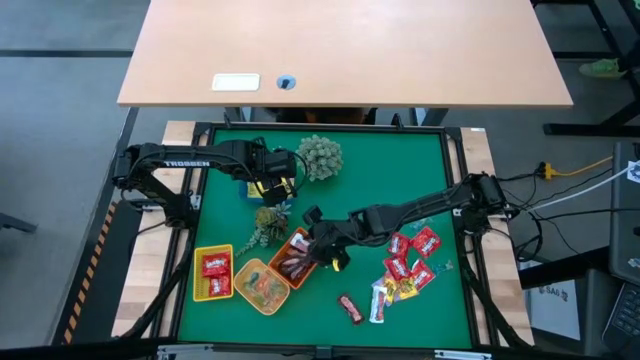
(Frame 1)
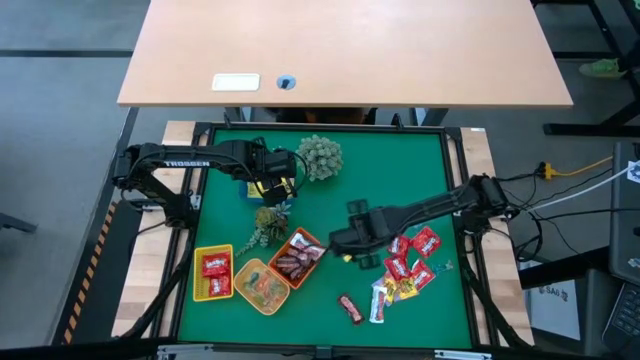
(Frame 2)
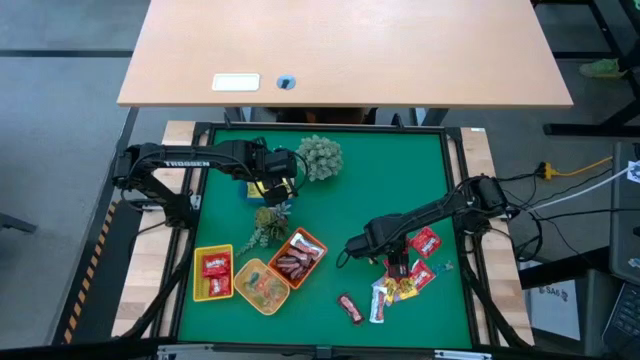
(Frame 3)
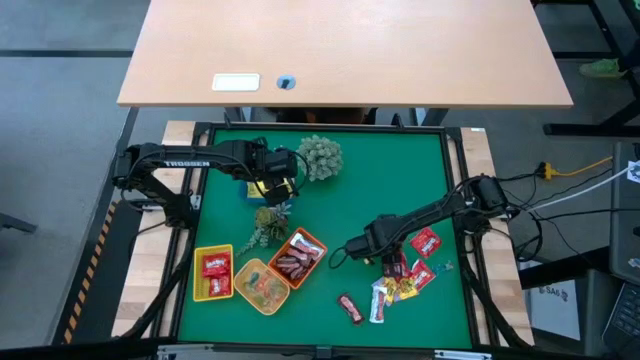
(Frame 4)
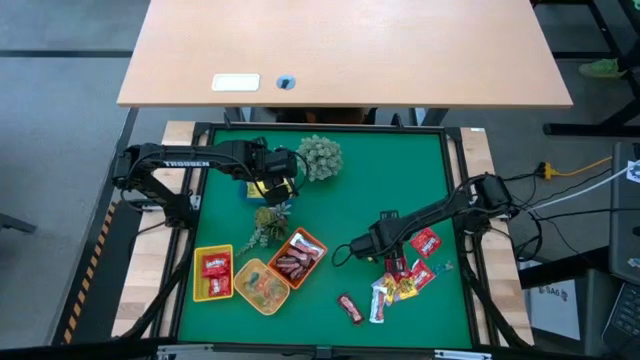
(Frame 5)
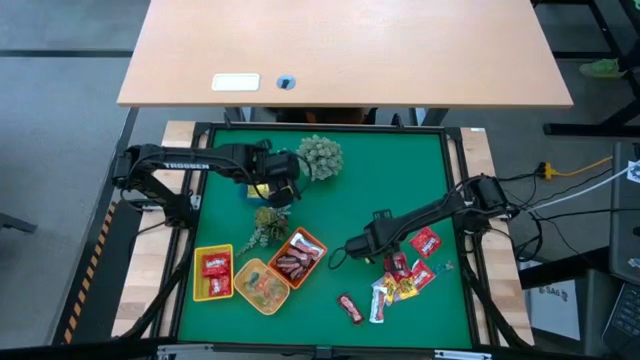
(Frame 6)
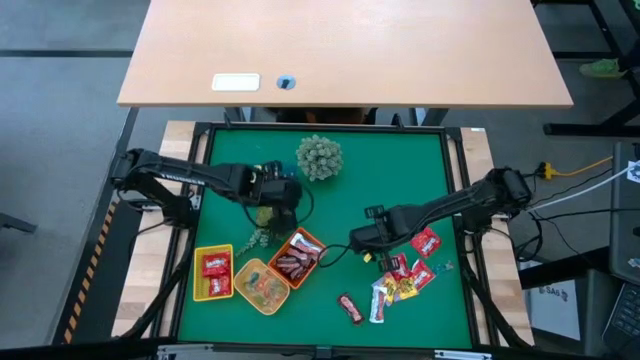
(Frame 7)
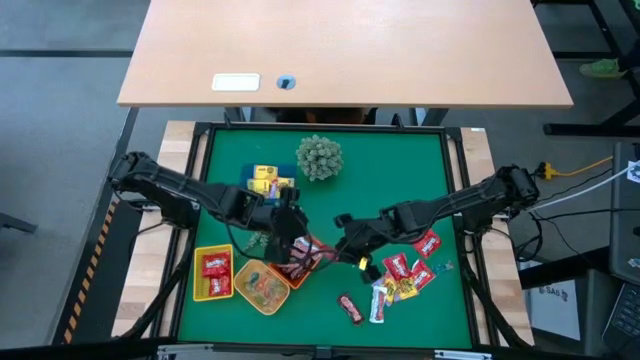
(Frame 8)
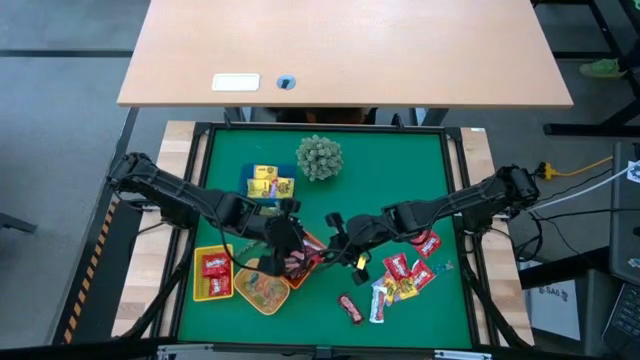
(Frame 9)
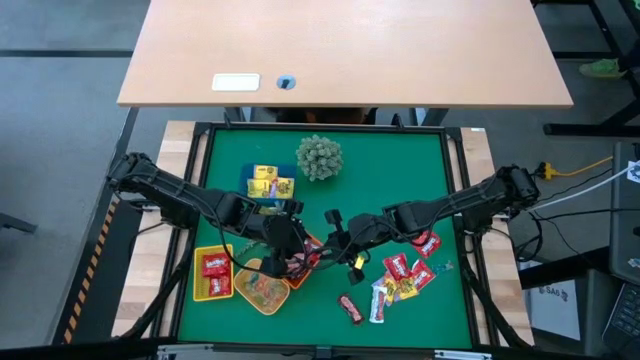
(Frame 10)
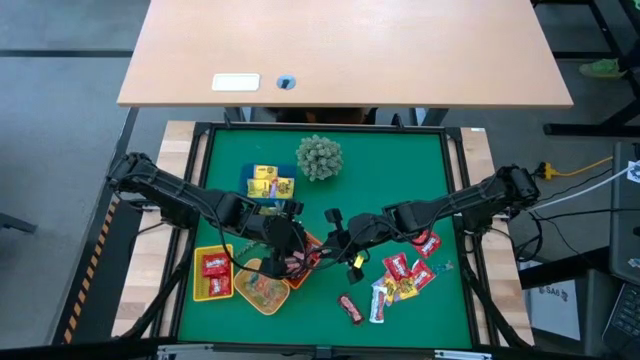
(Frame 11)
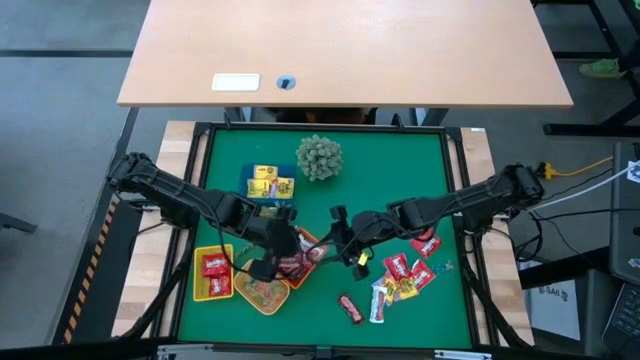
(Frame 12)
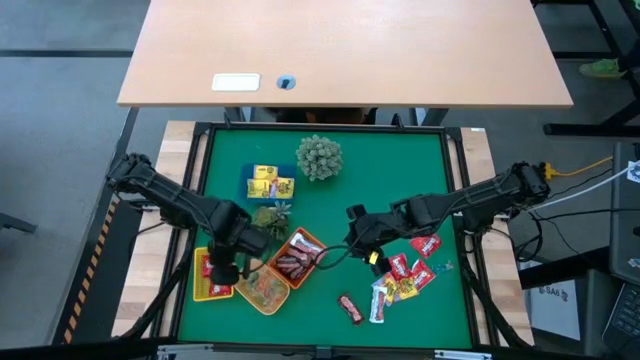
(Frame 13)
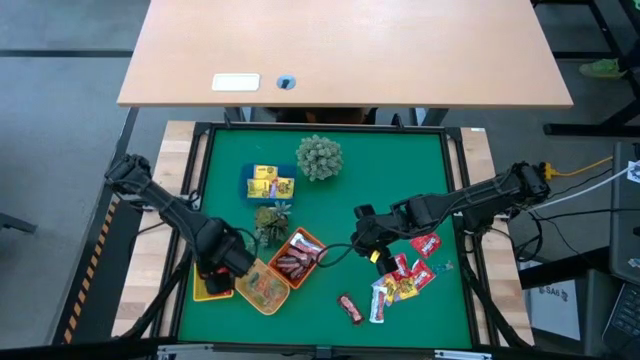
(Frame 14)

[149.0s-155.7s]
Task: Sort candy
Put the red candy into the yellow bin

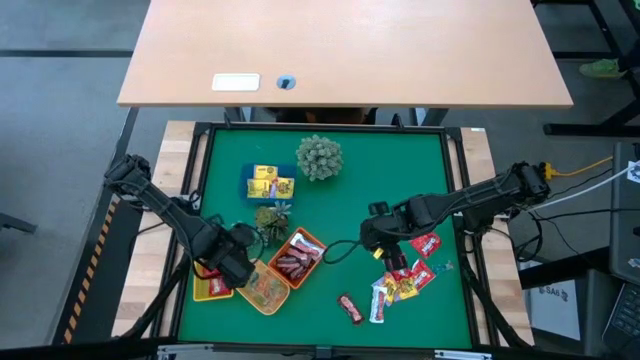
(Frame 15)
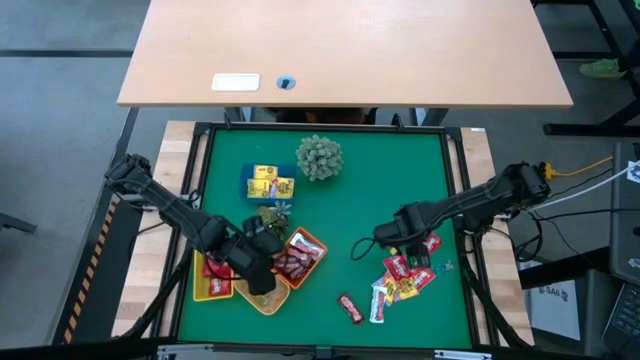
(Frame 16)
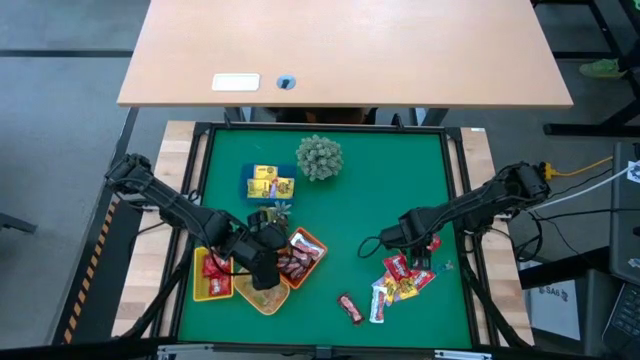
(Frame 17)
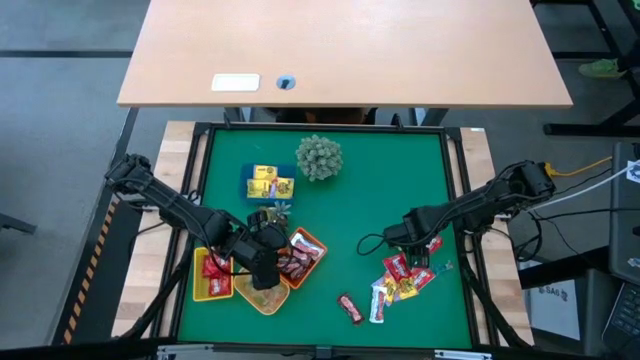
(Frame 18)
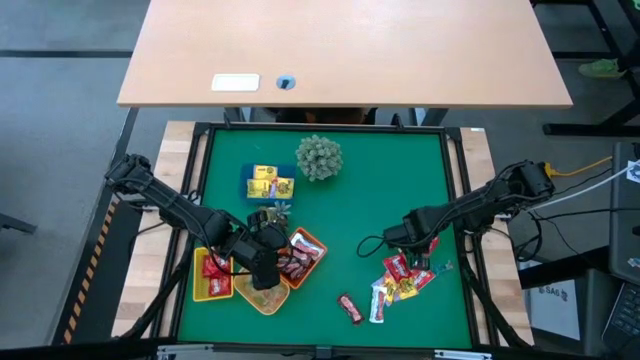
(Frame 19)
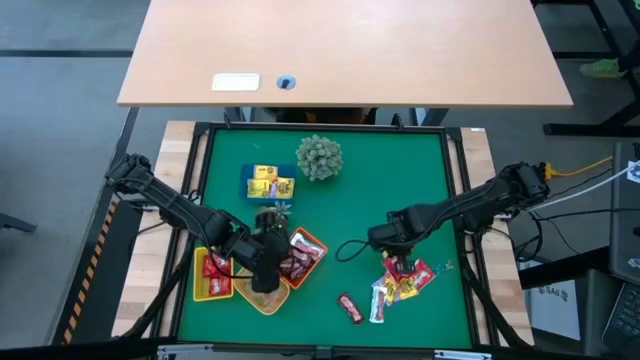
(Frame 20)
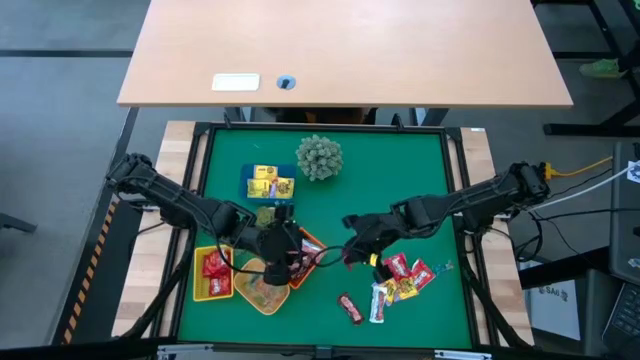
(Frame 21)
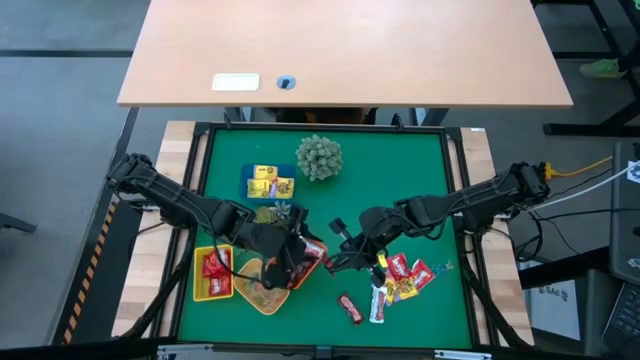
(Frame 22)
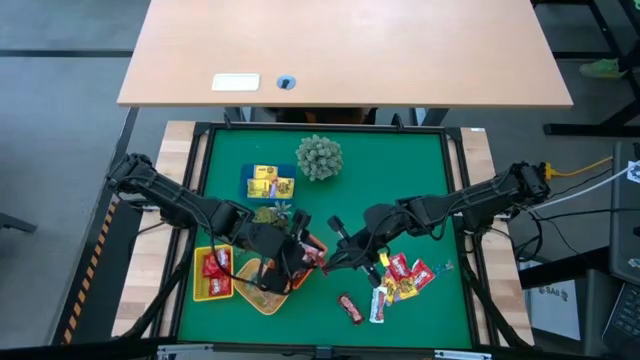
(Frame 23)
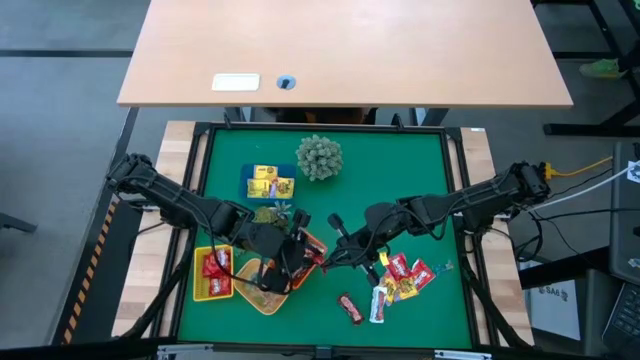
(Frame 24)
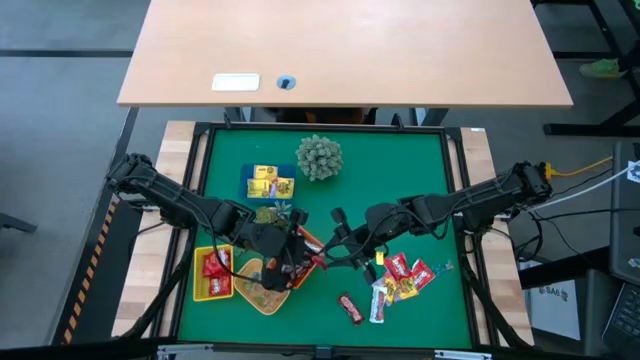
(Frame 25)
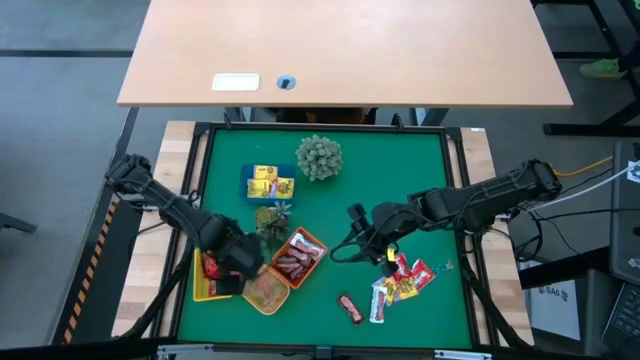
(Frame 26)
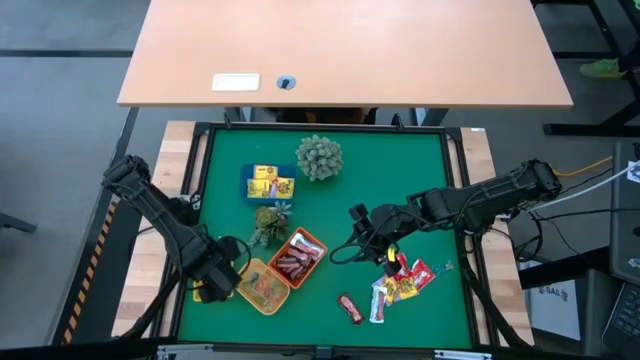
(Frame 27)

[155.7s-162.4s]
Put the red candy into the yellow bin

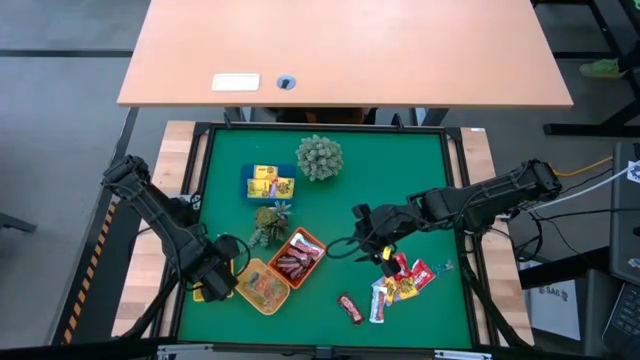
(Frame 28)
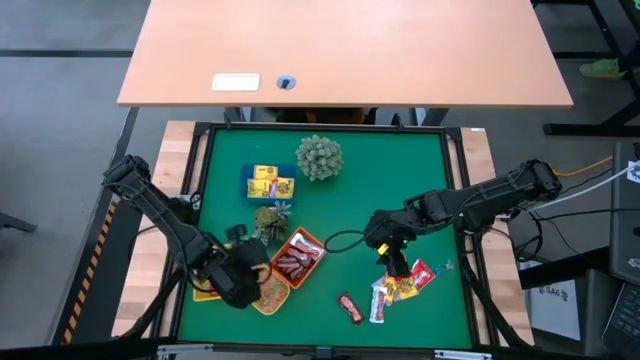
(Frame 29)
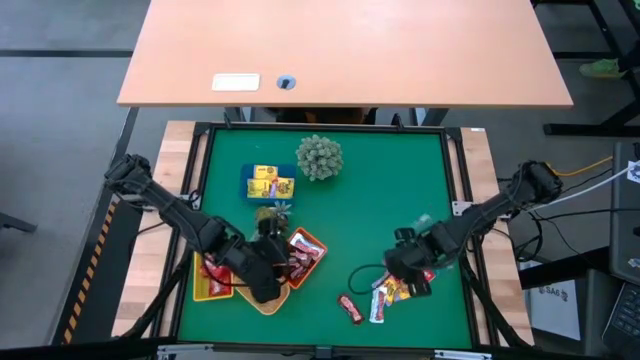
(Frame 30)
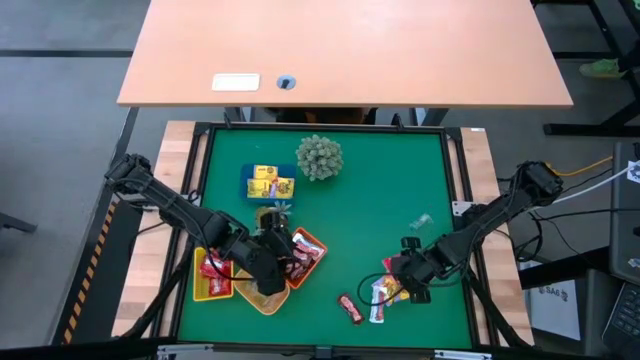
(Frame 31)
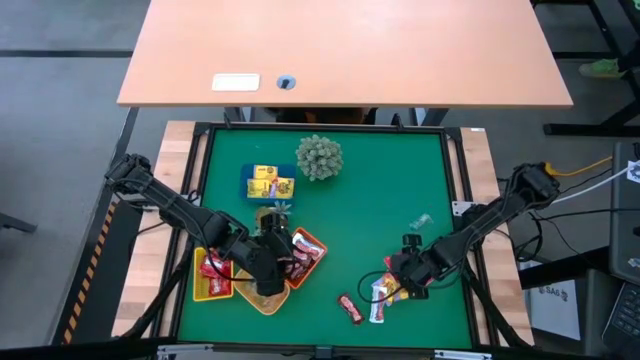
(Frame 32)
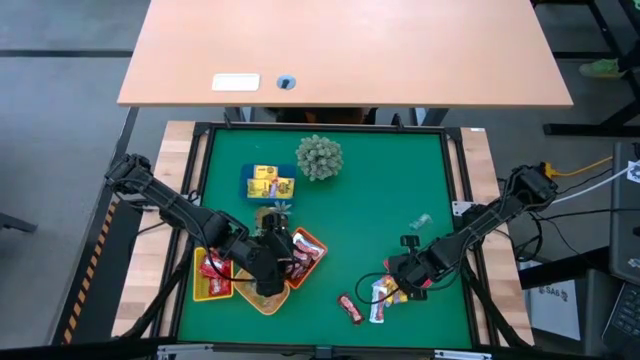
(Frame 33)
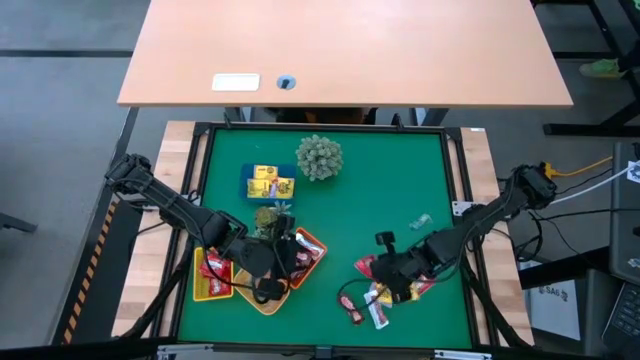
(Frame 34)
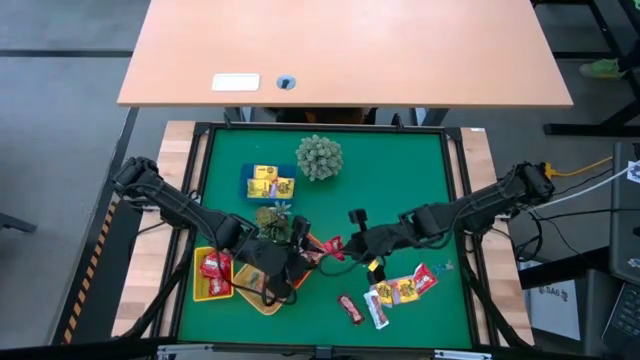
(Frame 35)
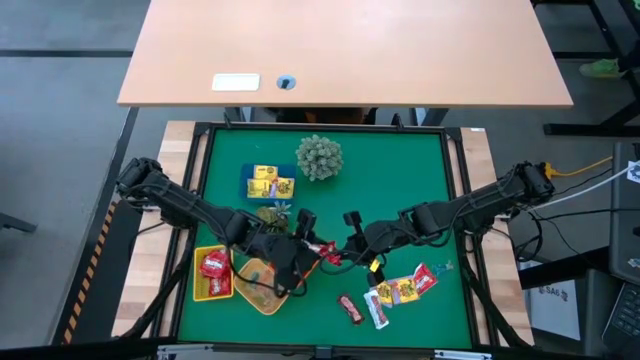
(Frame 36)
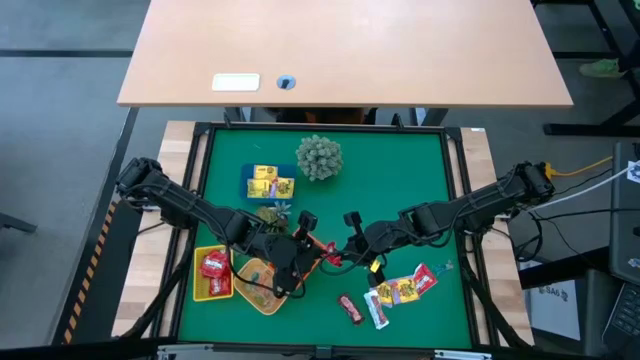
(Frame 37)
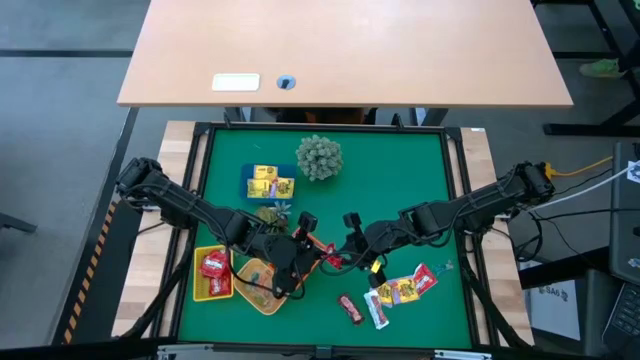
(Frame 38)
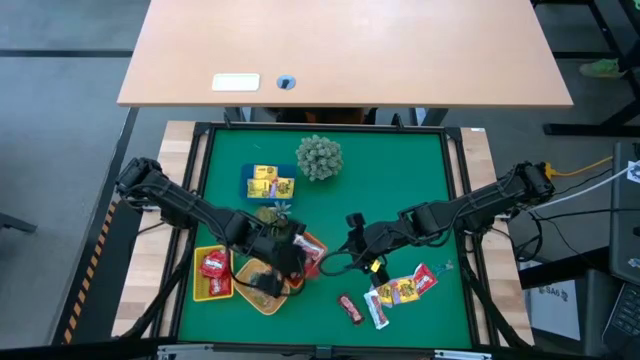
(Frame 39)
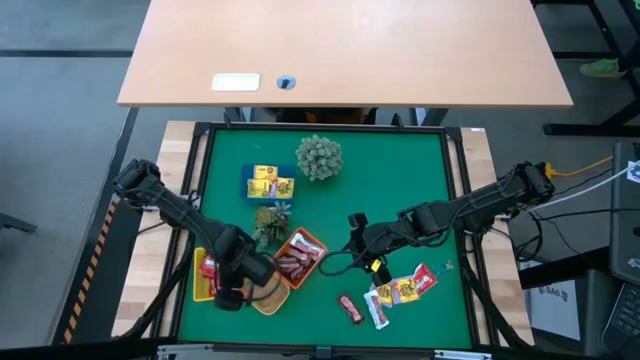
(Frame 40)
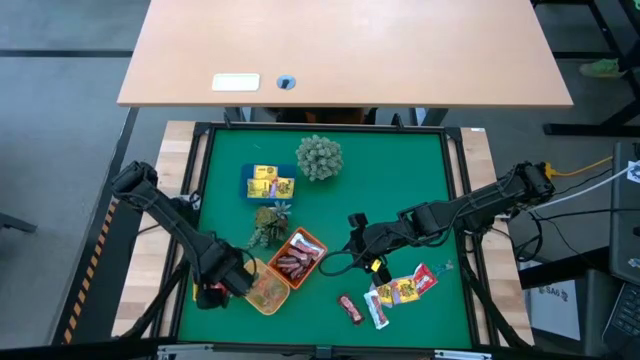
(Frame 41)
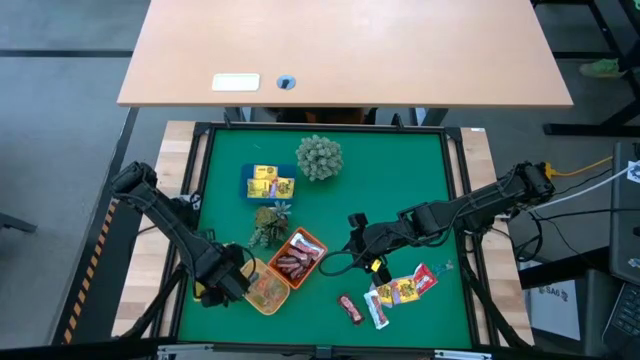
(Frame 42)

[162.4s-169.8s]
Put the red candy into the yellow bin
